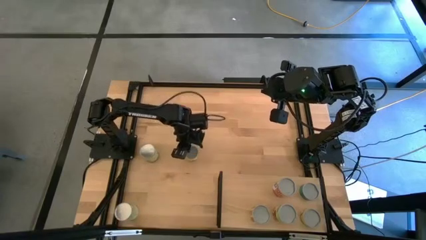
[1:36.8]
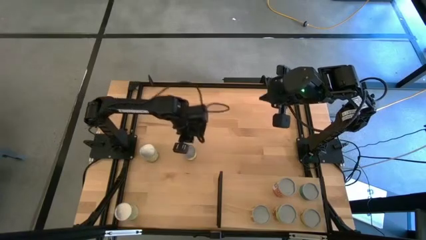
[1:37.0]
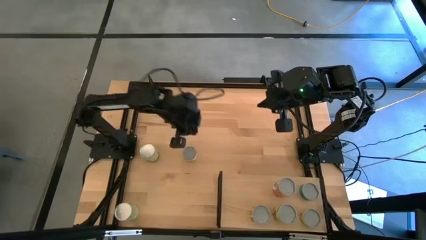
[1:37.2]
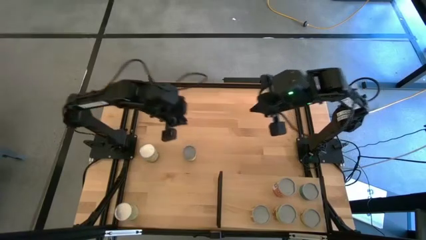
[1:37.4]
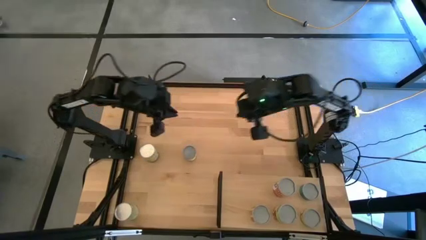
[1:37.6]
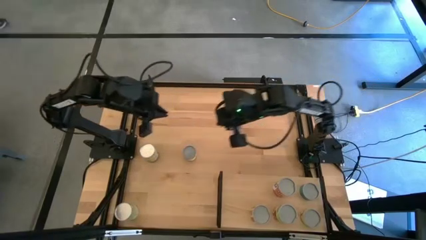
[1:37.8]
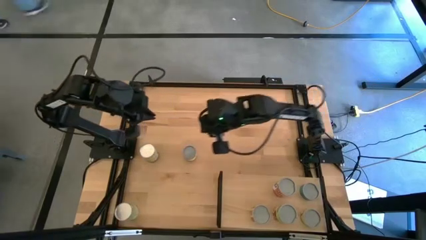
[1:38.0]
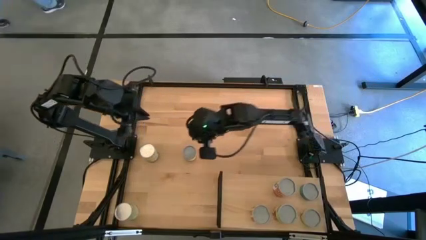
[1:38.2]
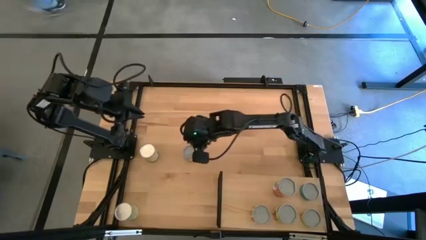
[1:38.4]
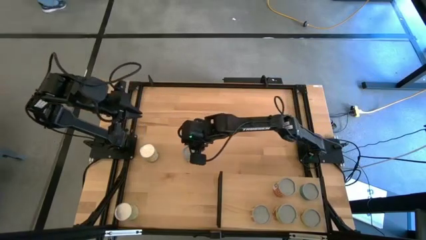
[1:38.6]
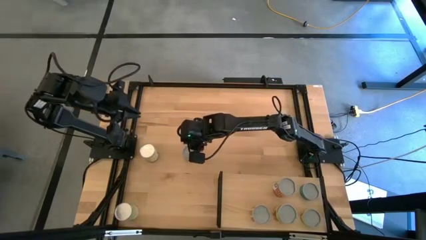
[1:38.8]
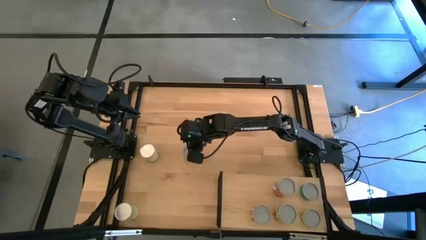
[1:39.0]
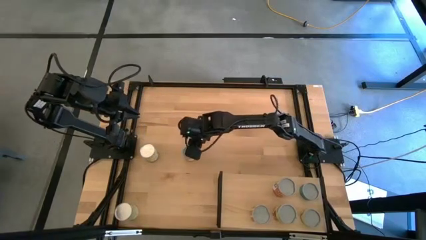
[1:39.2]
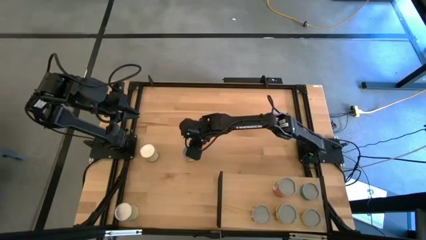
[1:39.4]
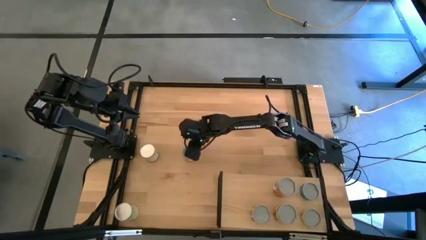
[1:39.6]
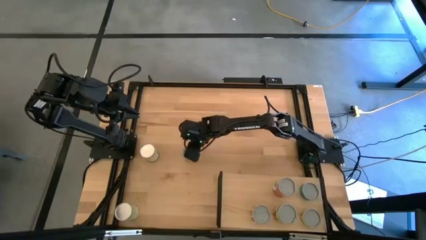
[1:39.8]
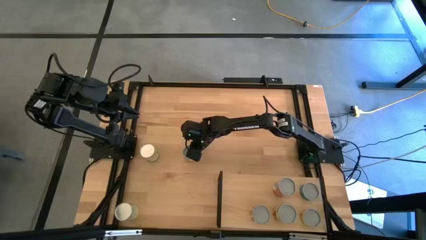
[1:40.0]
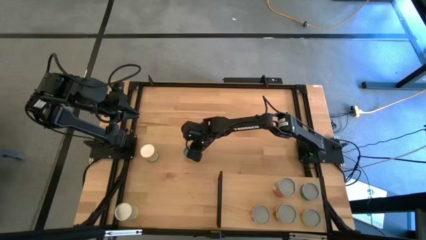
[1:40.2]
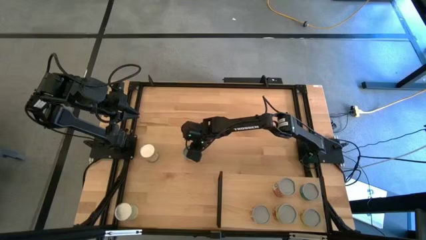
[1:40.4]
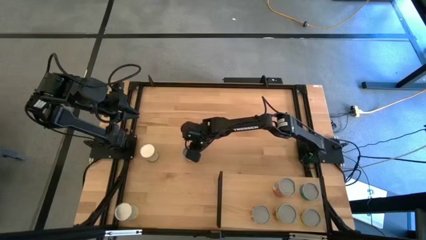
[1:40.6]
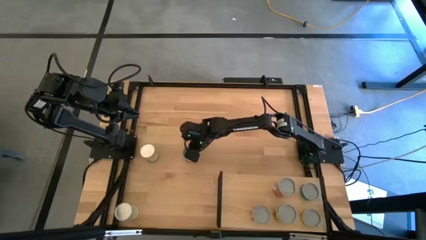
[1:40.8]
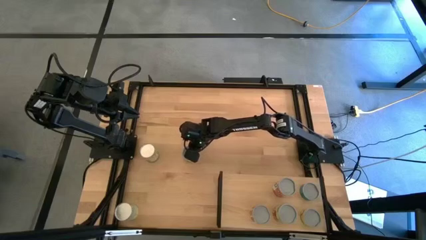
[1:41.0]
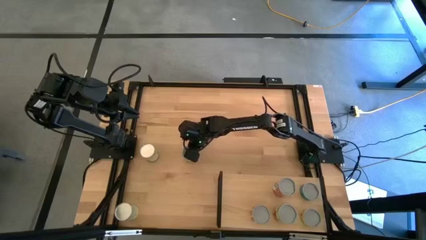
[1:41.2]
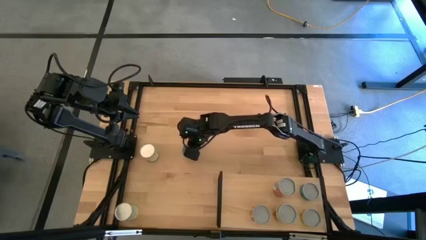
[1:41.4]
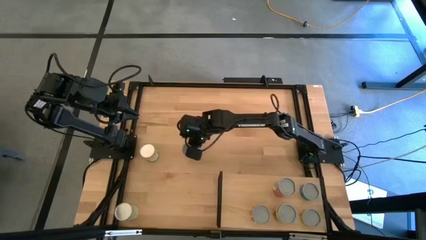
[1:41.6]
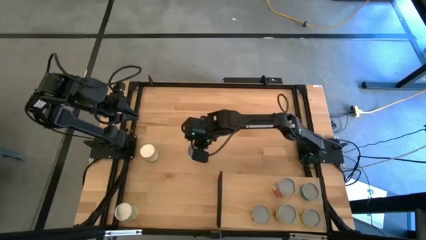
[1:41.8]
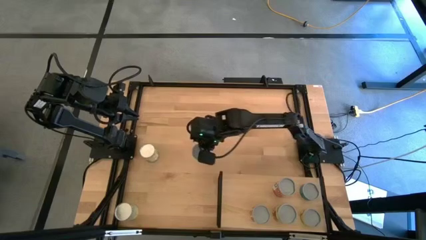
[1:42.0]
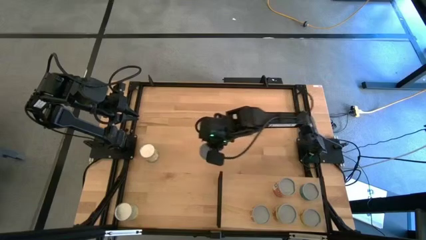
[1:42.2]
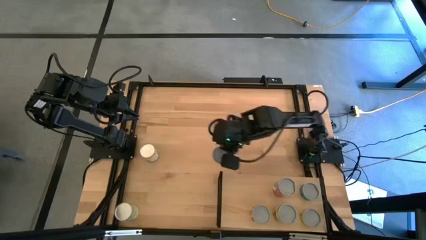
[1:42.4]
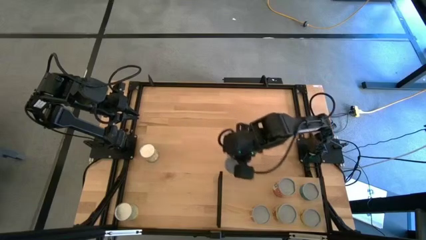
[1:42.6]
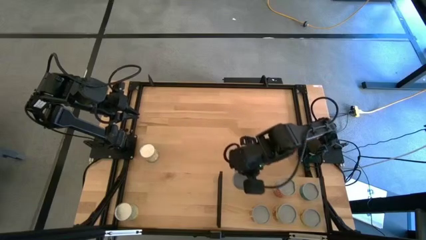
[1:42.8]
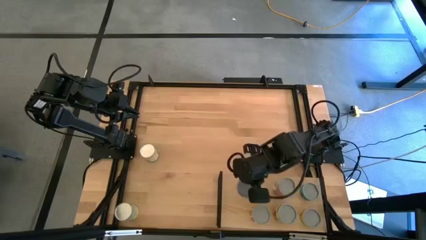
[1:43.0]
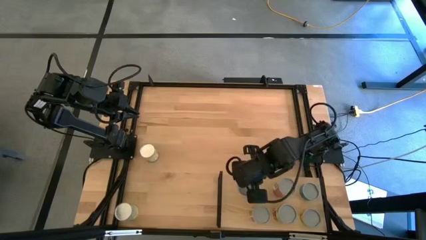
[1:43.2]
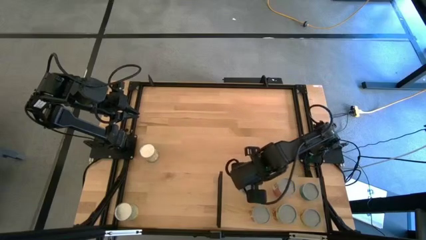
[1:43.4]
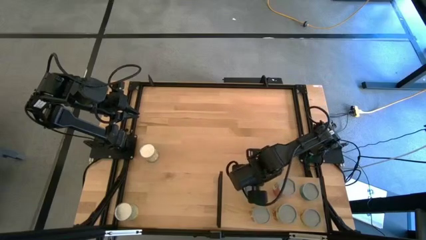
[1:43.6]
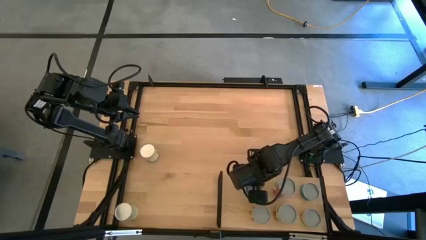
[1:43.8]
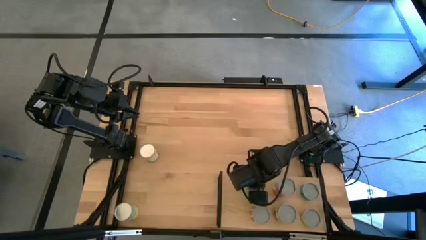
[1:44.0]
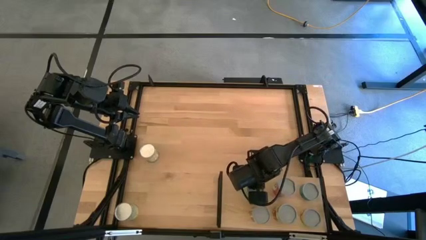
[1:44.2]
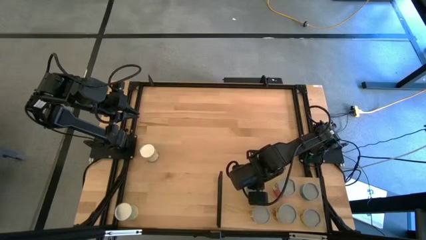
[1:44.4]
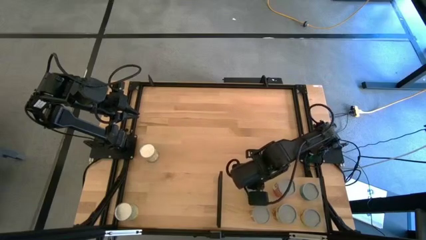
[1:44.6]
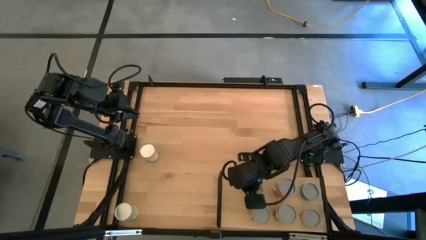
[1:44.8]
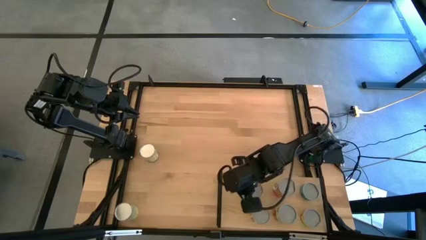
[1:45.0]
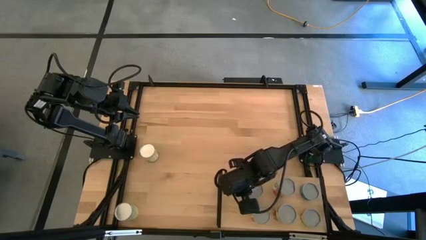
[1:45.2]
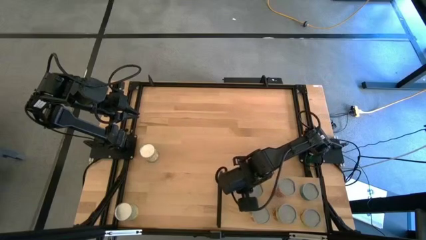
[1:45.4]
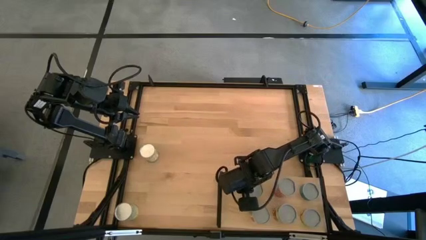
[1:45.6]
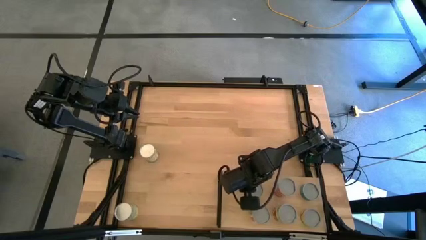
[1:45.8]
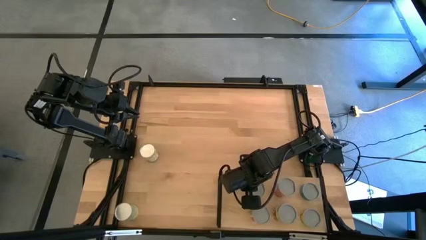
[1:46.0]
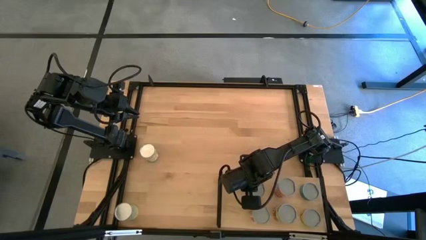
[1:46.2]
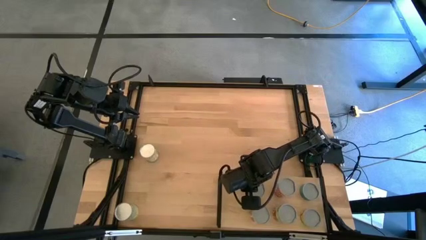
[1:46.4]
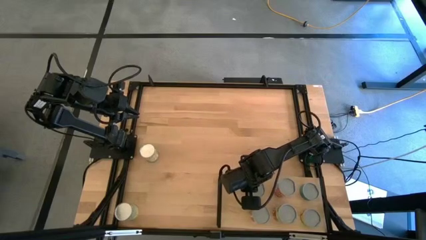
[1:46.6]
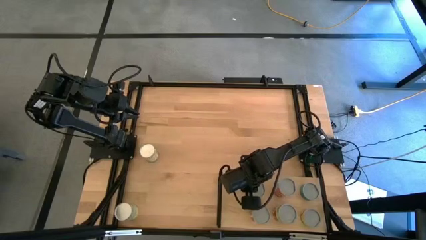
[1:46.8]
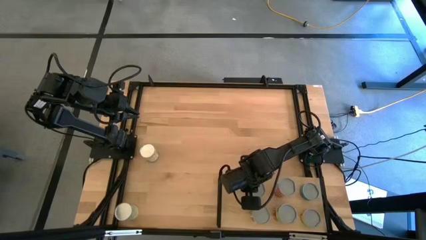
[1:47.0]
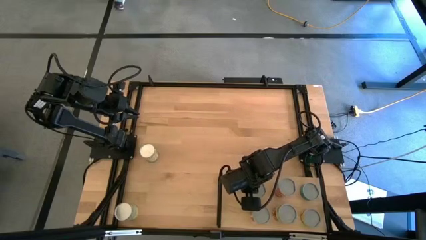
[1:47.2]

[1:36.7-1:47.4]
Task: Pick and place cans onto a shelf
Put the canned peach on the shelf
